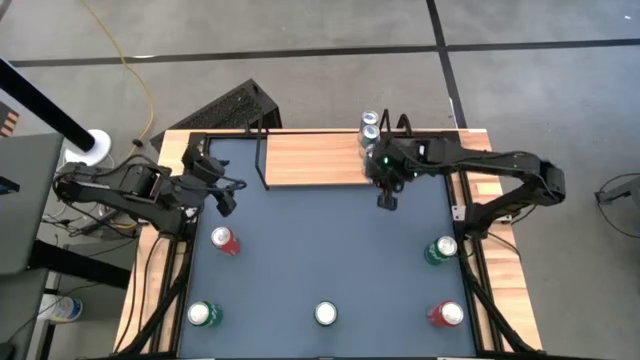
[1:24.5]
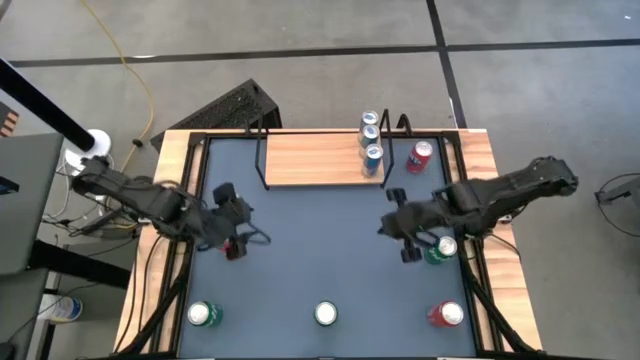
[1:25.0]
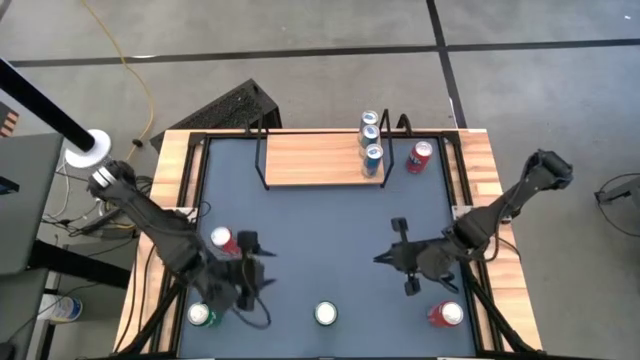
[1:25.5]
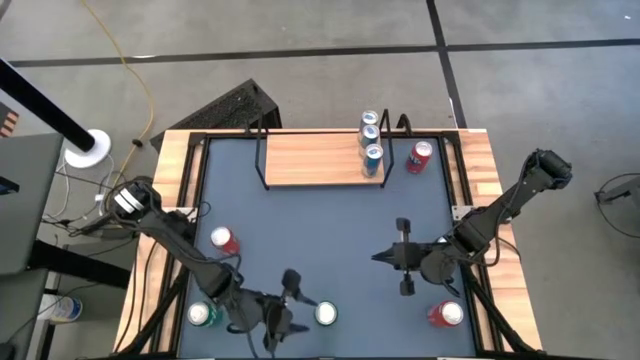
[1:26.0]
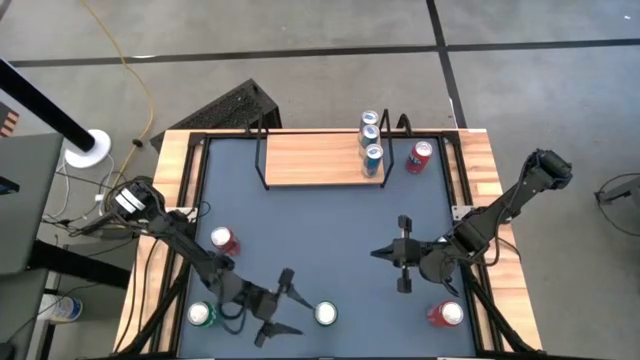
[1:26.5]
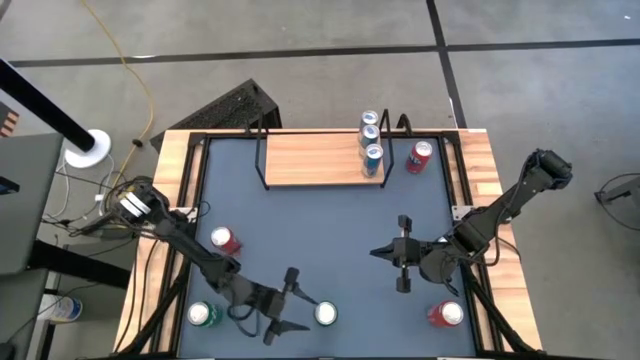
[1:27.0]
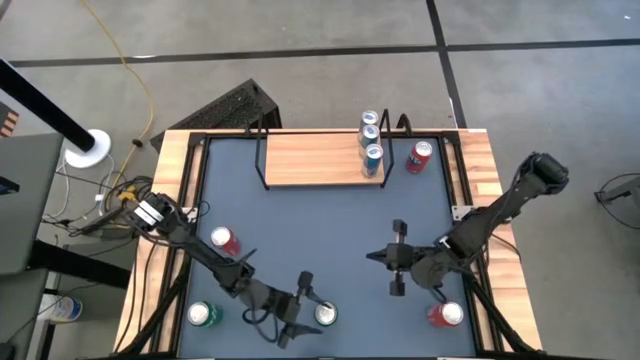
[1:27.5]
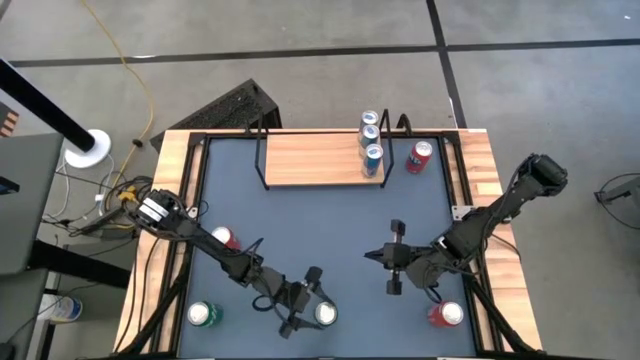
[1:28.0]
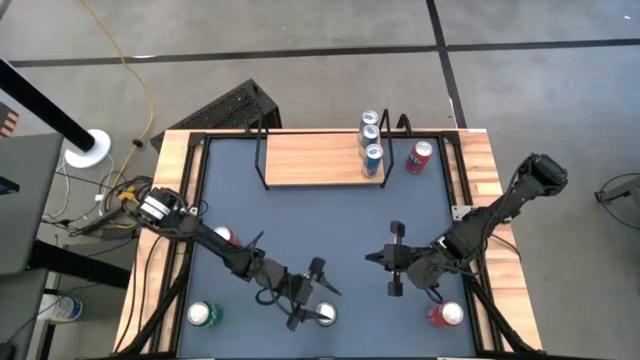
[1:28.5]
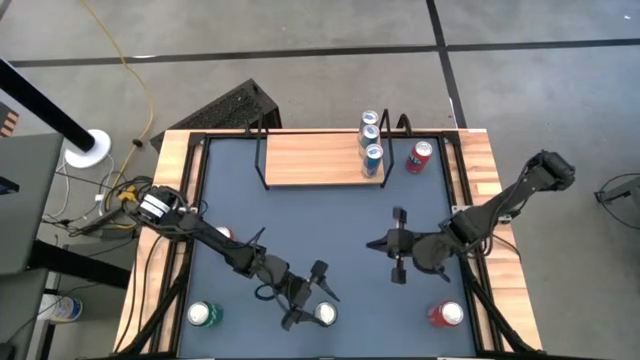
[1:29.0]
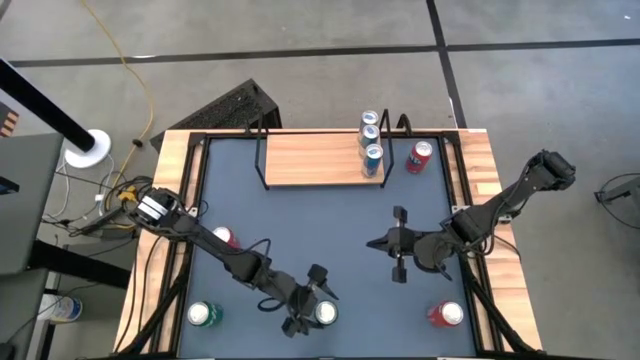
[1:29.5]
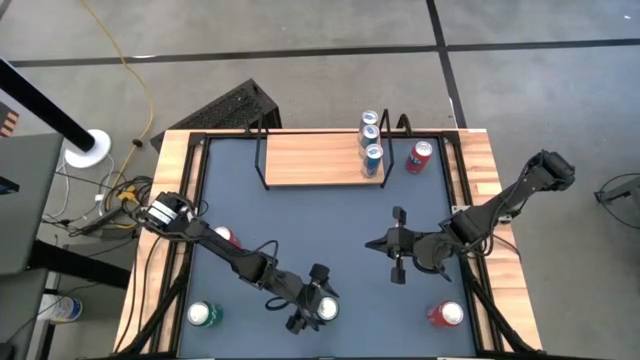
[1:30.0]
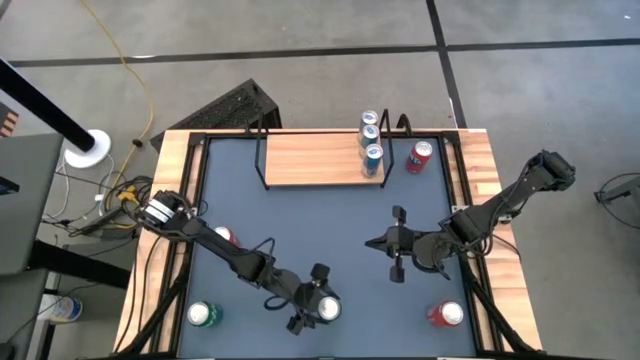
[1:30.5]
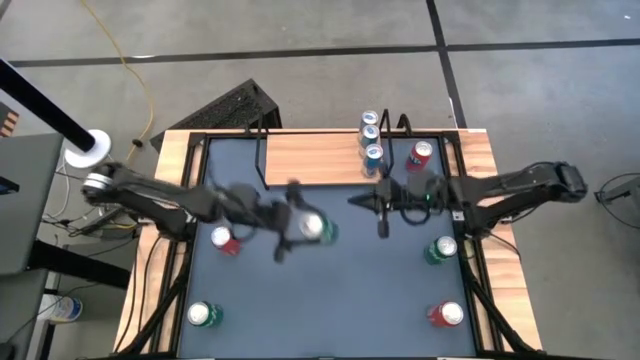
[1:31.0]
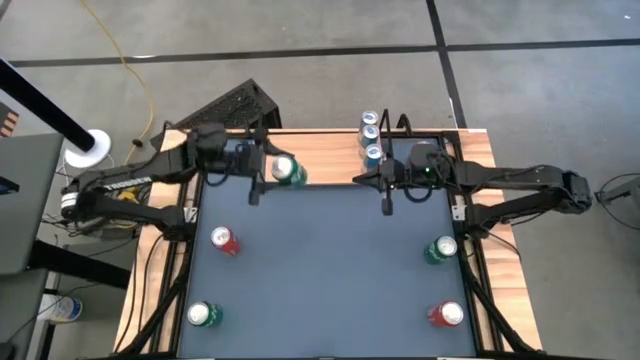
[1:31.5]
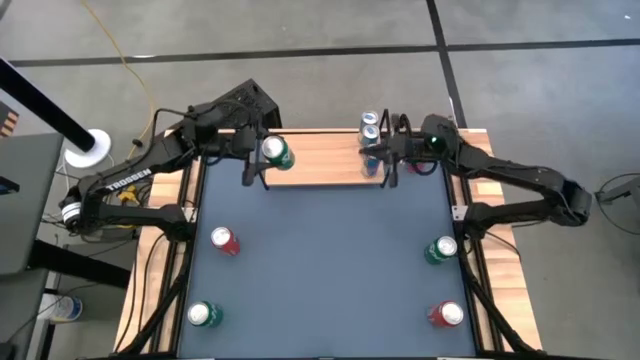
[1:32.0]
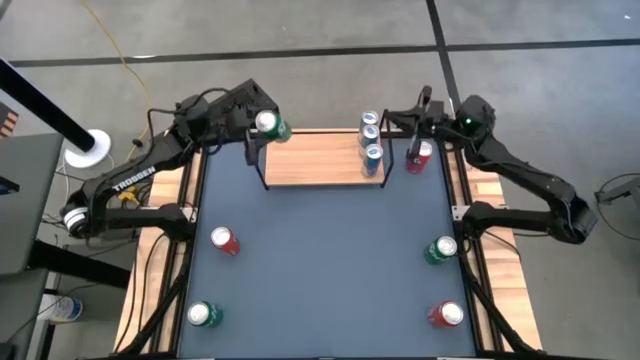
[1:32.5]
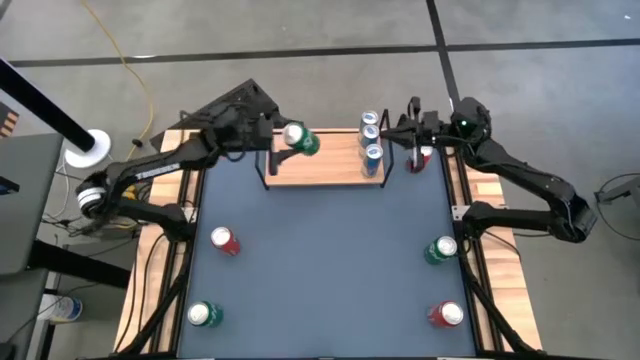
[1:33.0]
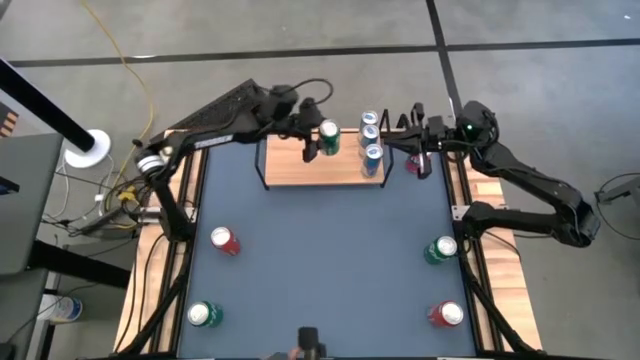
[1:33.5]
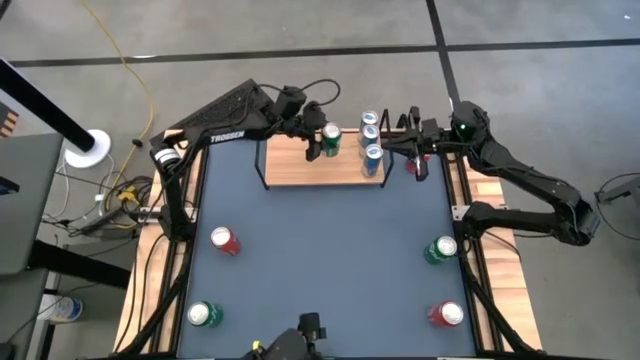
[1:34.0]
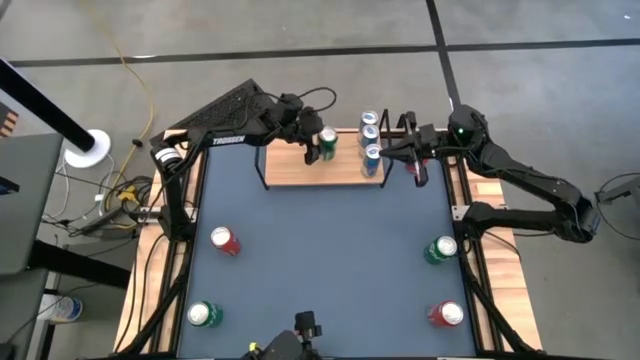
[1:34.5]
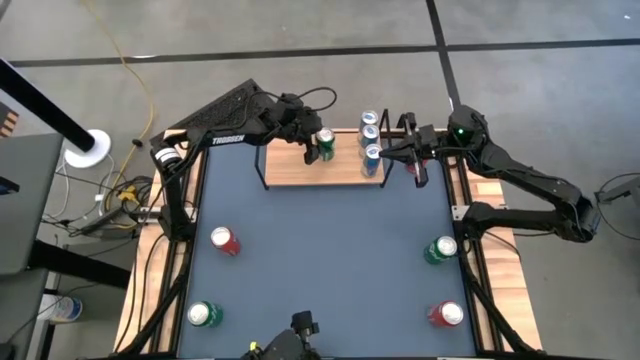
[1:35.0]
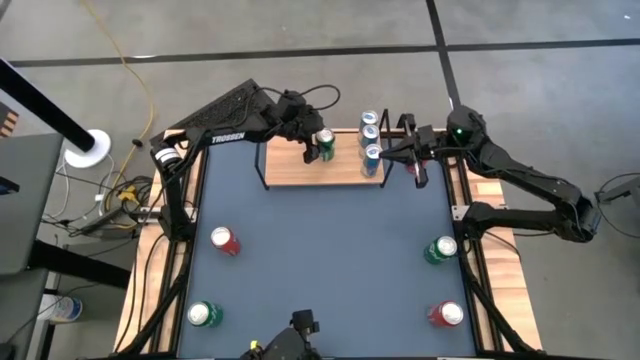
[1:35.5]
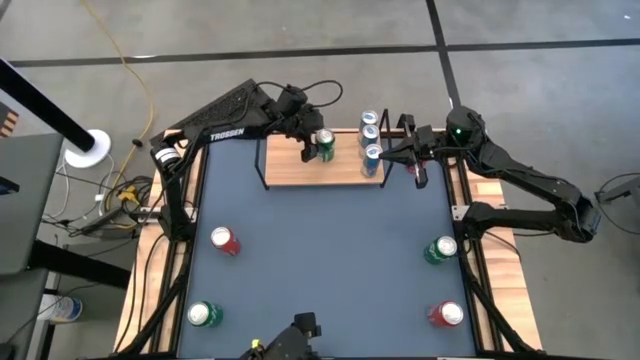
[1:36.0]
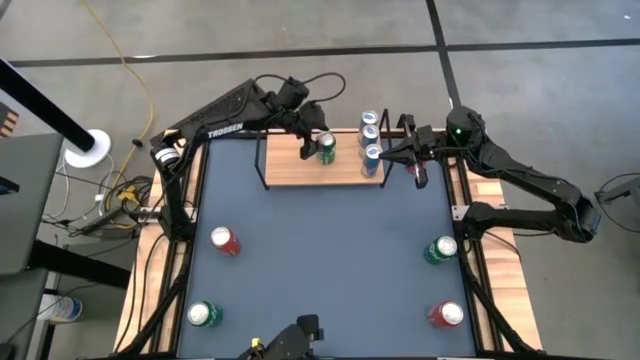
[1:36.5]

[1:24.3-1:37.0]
Task: Place canned beverage on shelf
Put the right green soda can on the shelf

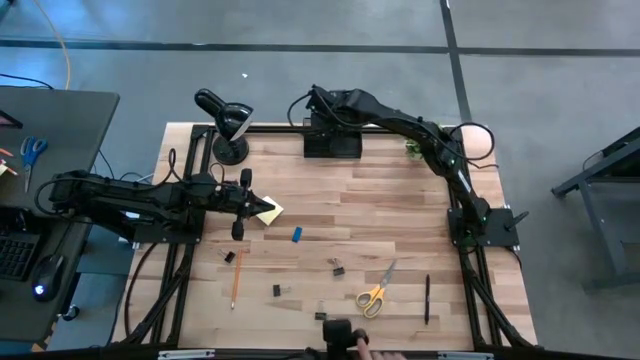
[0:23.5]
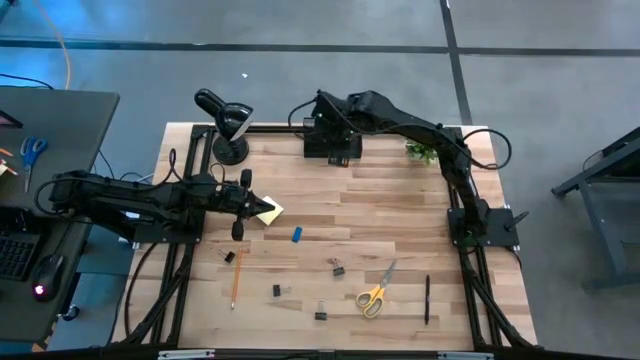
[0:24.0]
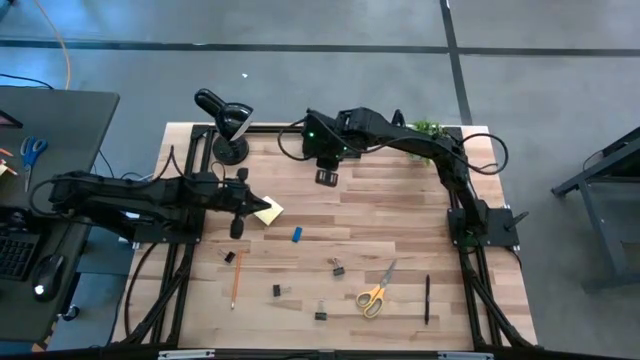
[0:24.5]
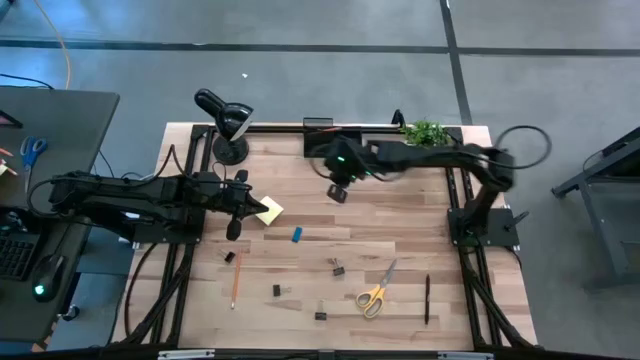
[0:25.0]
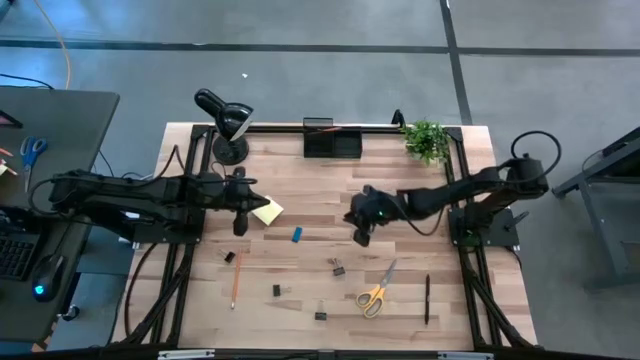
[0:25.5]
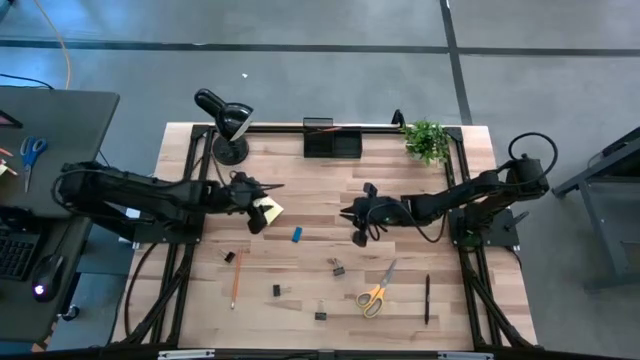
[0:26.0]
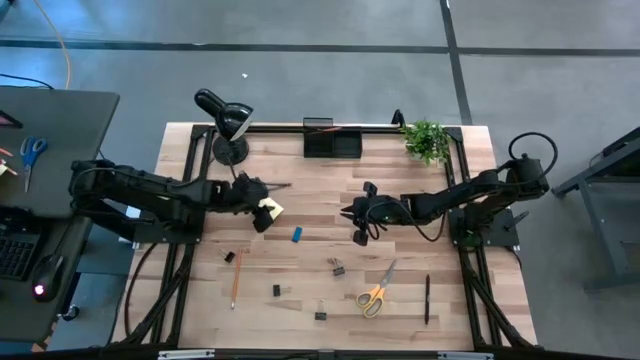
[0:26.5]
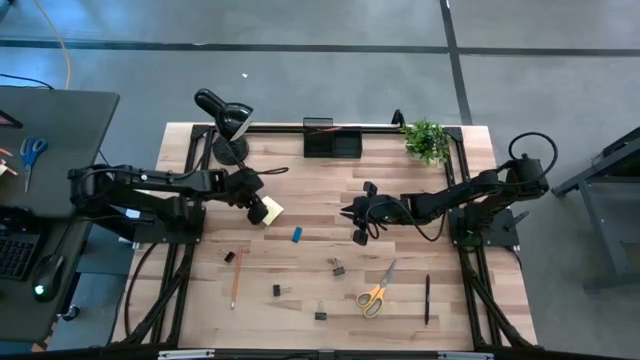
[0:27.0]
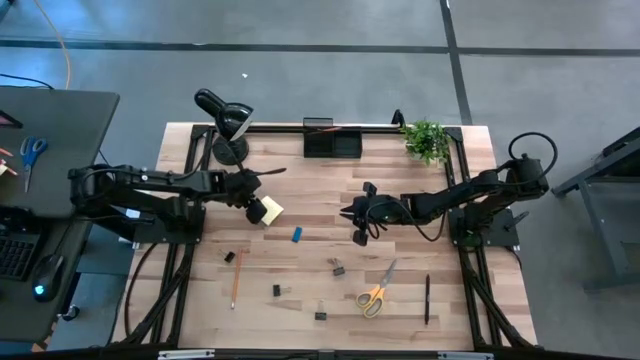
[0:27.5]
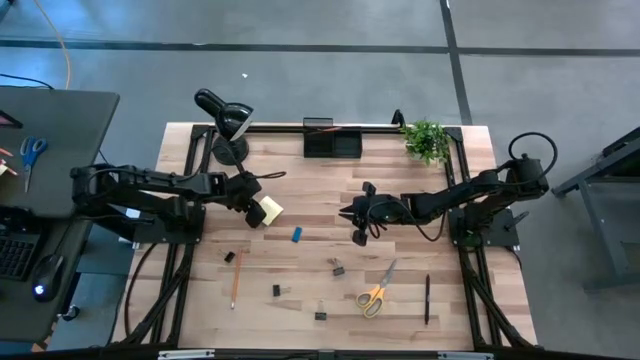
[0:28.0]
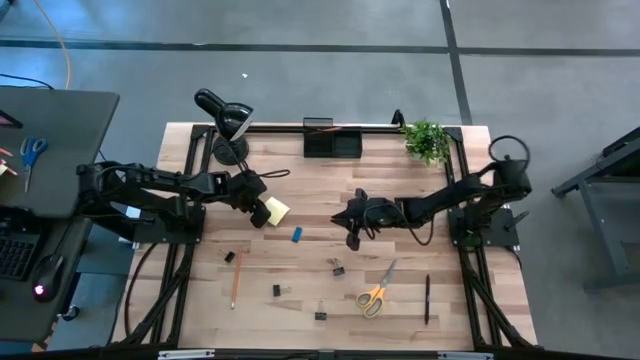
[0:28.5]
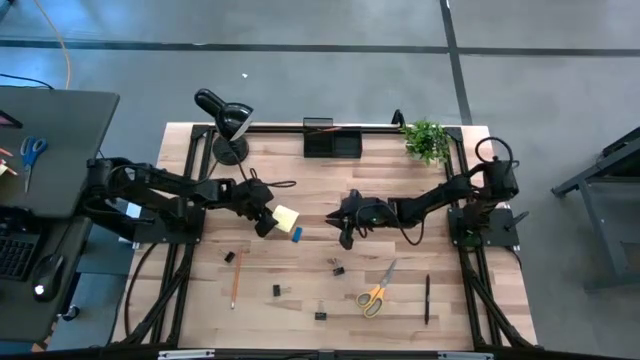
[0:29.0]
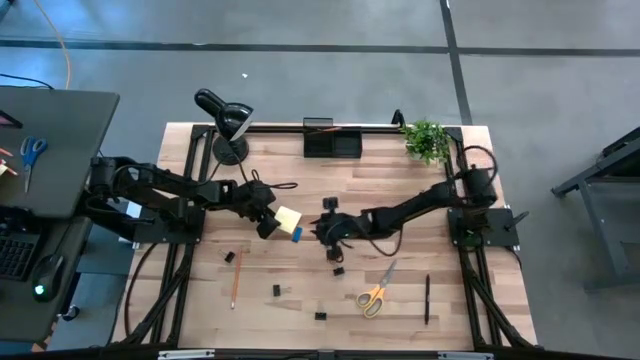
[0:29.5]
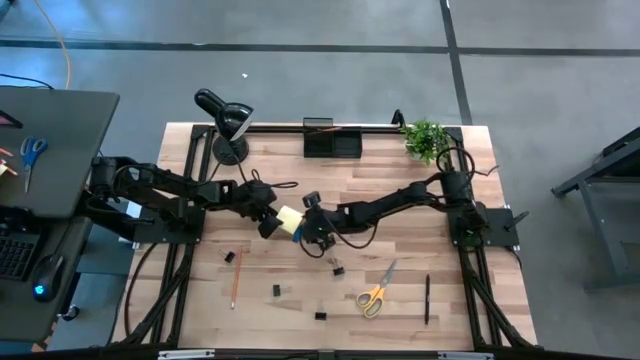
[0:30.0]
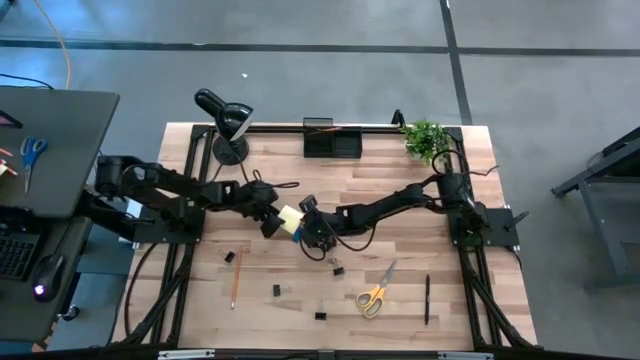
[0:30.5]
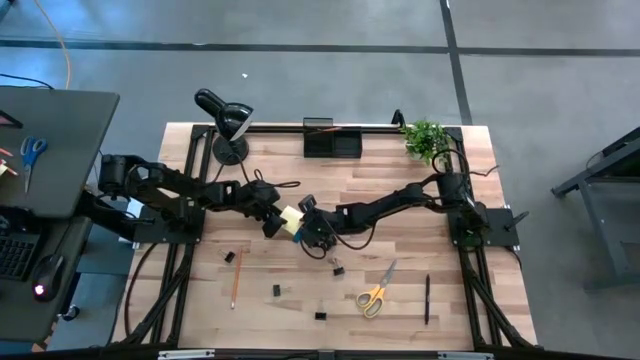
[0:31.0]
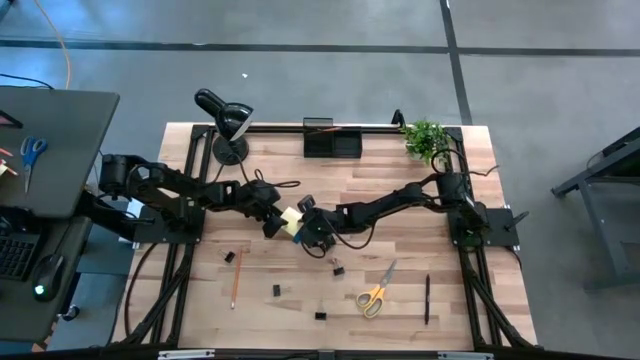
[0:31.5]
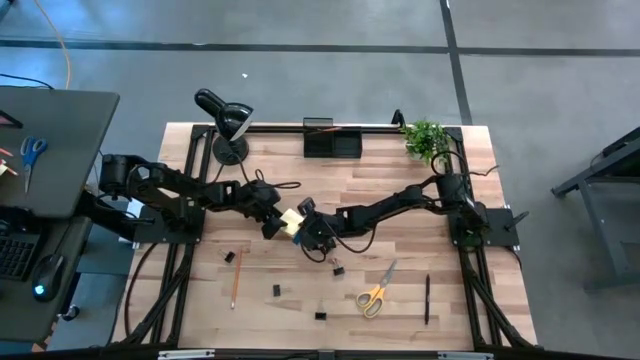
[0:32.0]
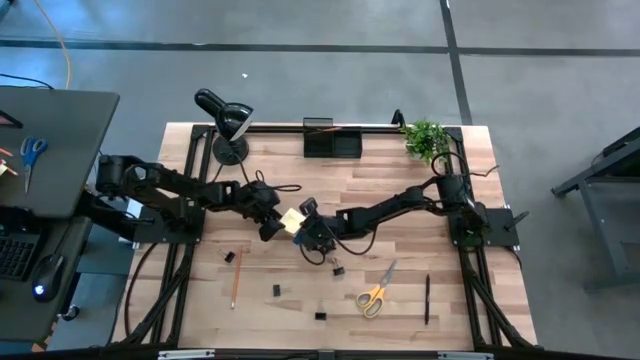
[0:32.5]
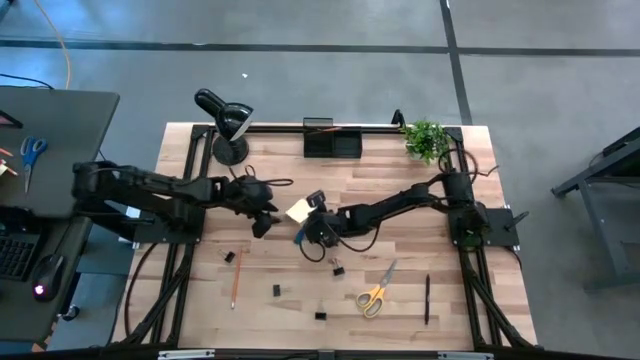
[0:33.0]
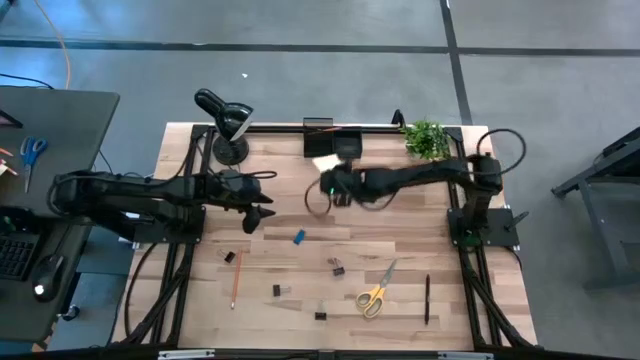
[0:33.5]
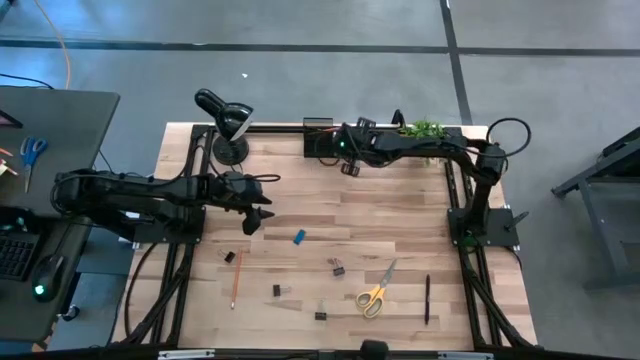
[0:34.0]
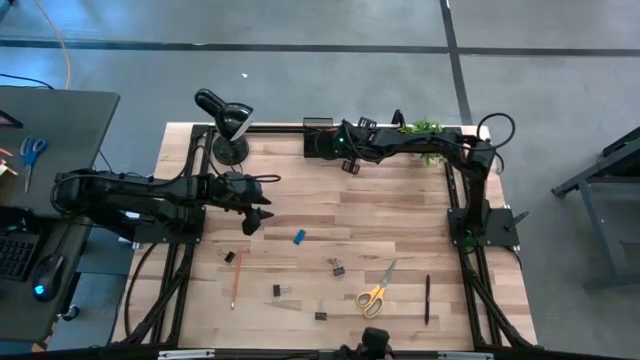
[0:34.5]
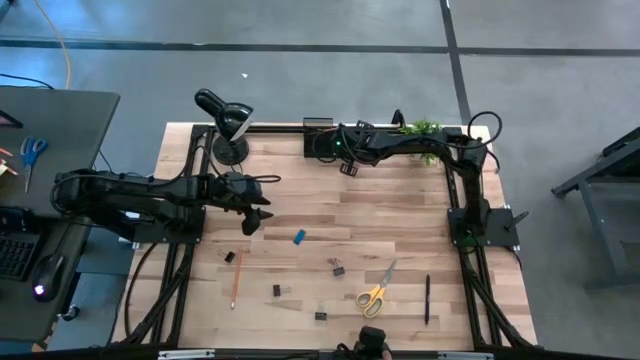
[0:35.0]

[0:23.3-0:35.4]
Task: Pick and place office supplies into organizer
Put the yellow sticky notes into the black desk organizer
